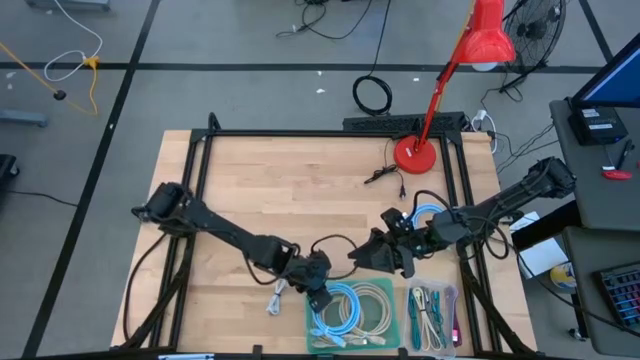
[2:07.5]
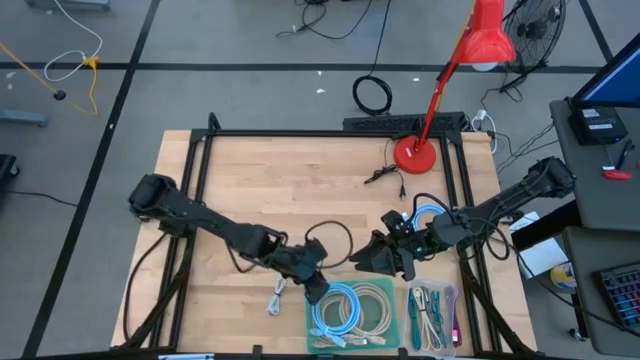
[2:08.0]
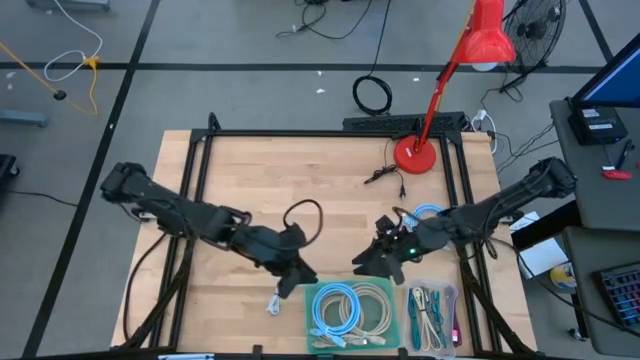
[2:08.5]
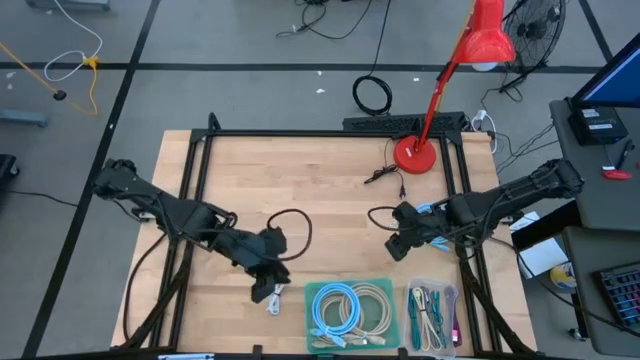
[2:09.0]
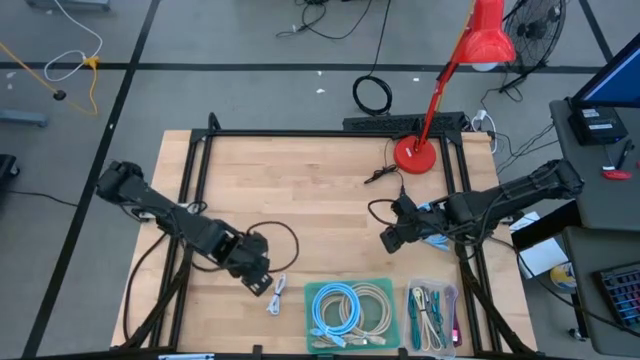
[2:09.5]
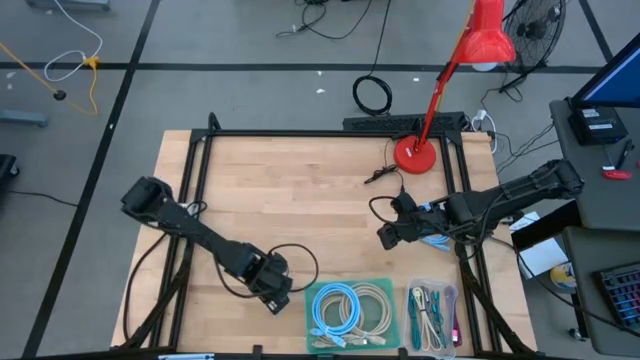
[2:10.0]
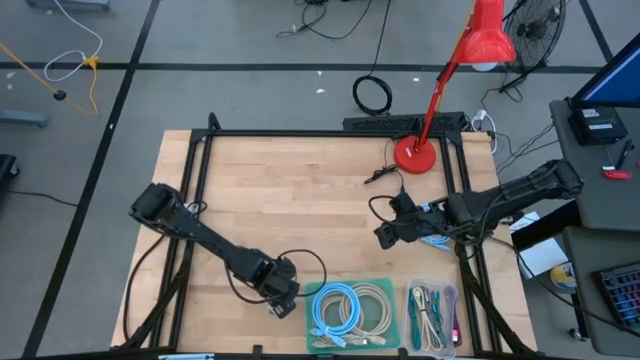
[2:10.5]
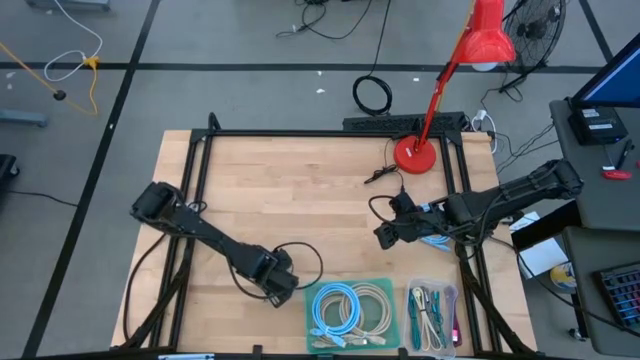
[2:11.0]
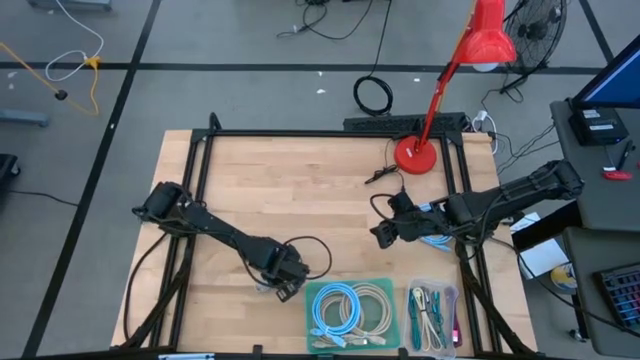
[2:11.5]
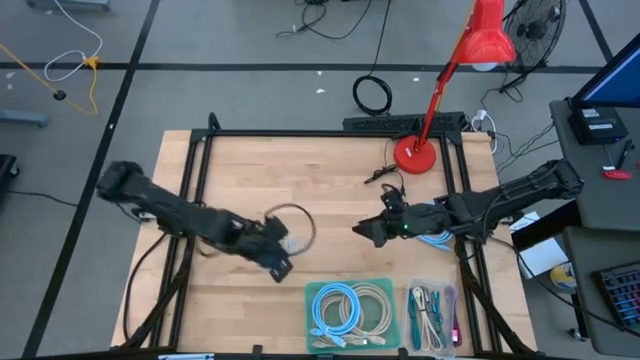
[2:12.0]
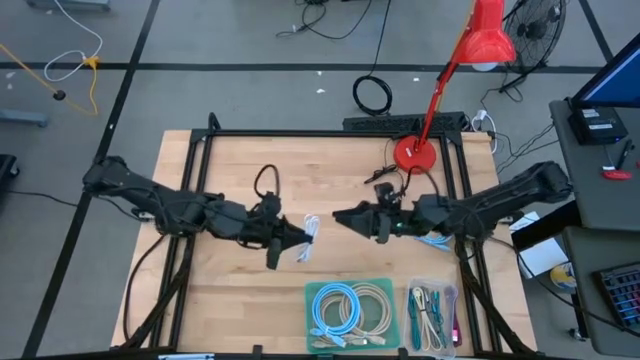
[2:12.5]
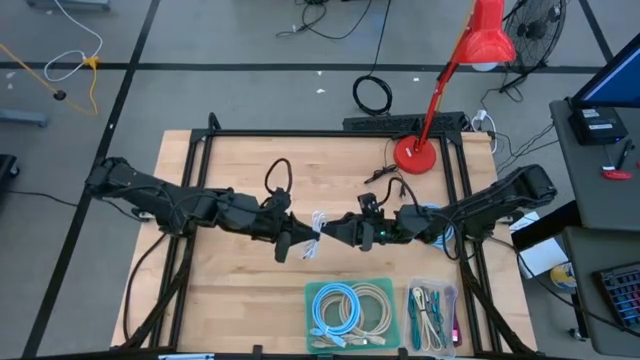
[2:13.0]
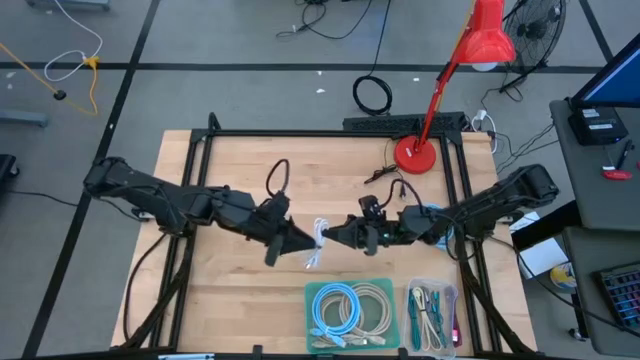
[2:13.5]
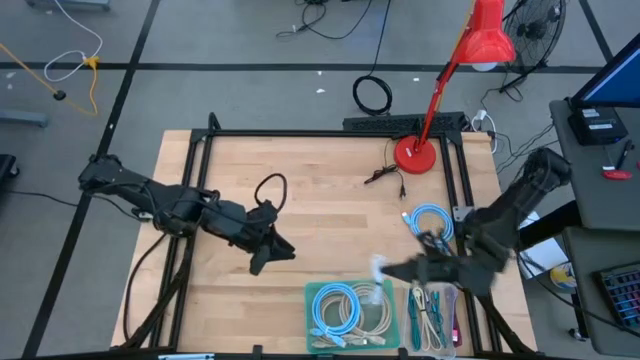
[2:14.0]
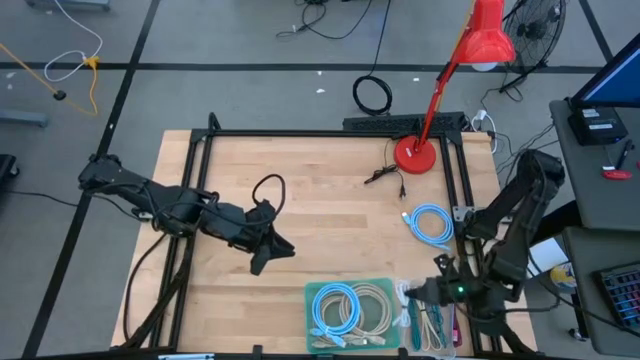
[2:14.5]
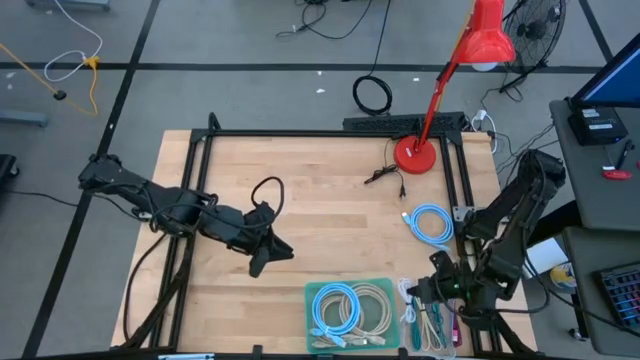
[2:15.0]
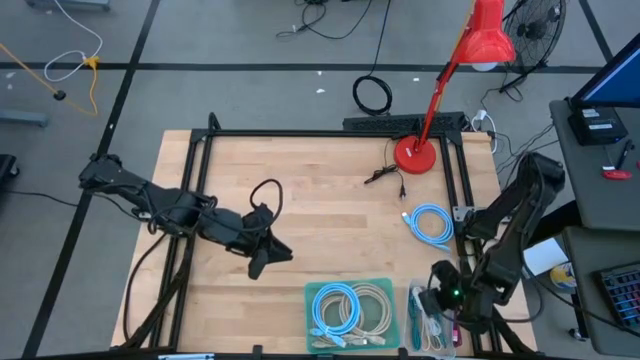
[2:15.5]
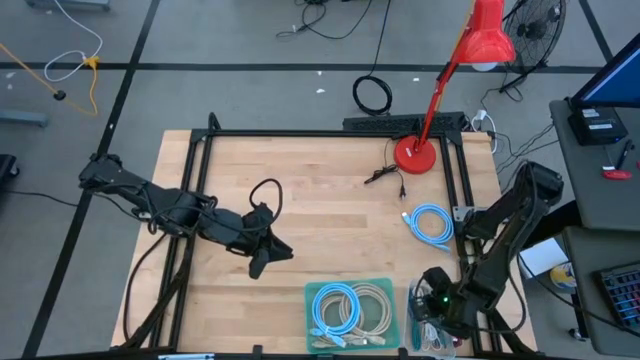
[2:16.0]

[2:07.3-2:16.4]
Task: Pick & Place USB Port
Put the white charger cable into the white transparent bin

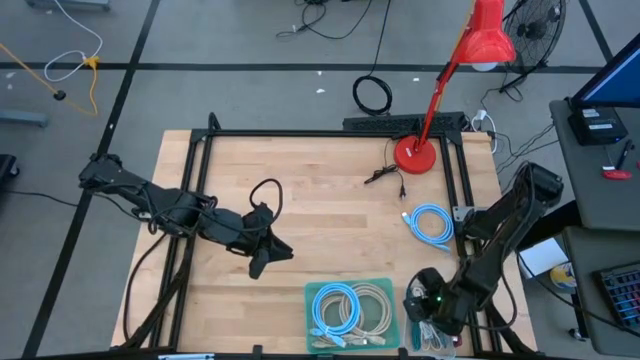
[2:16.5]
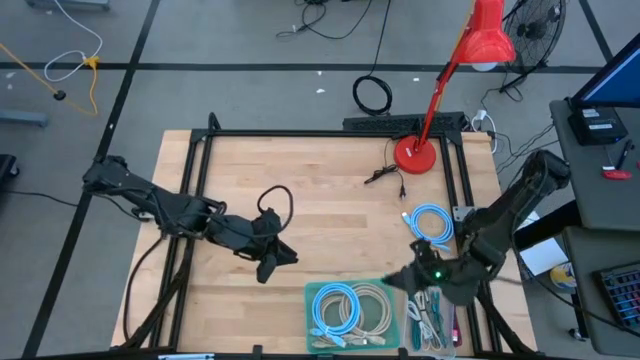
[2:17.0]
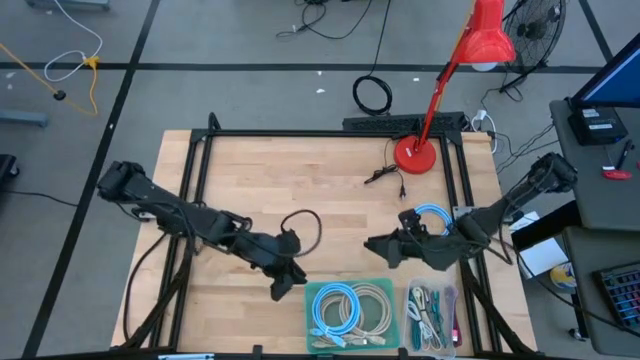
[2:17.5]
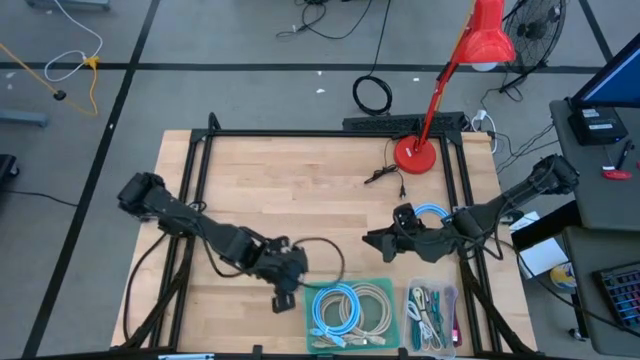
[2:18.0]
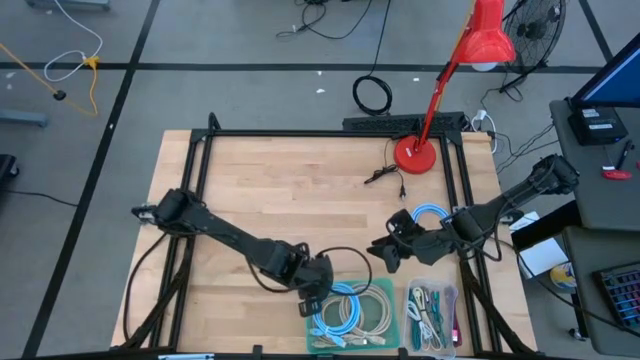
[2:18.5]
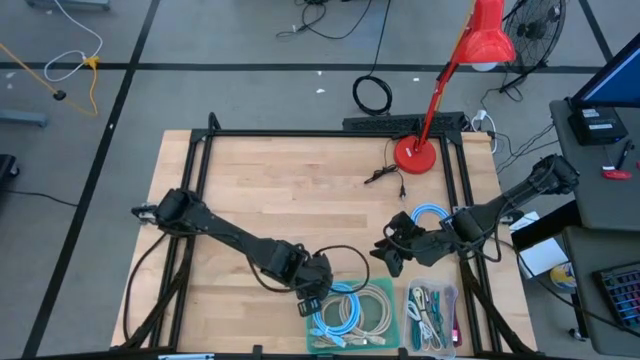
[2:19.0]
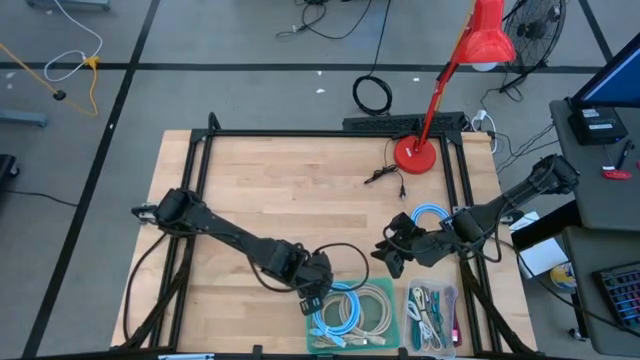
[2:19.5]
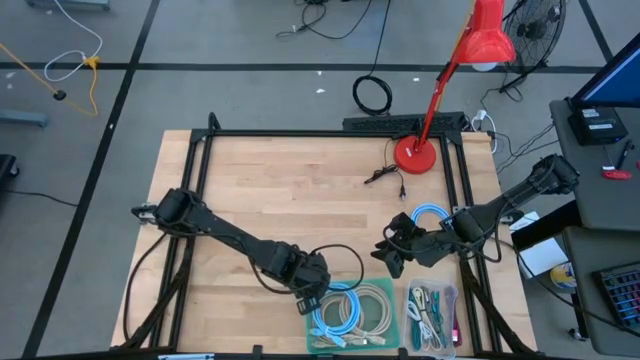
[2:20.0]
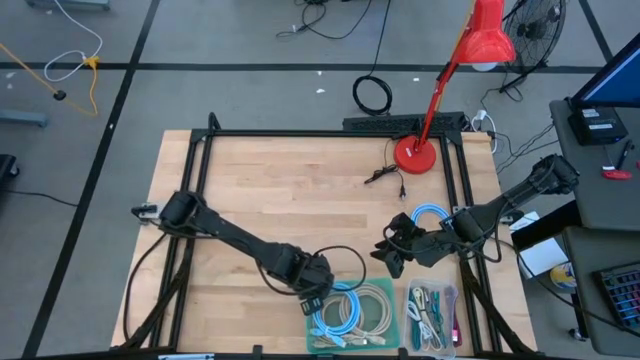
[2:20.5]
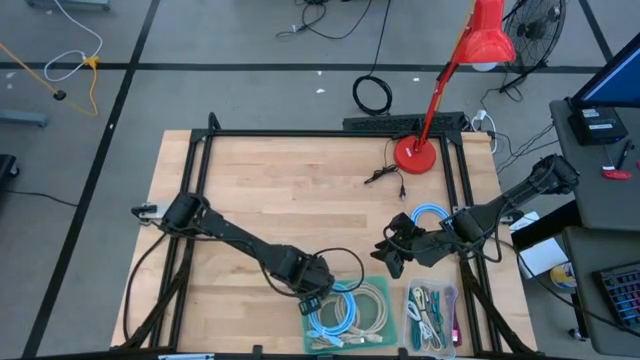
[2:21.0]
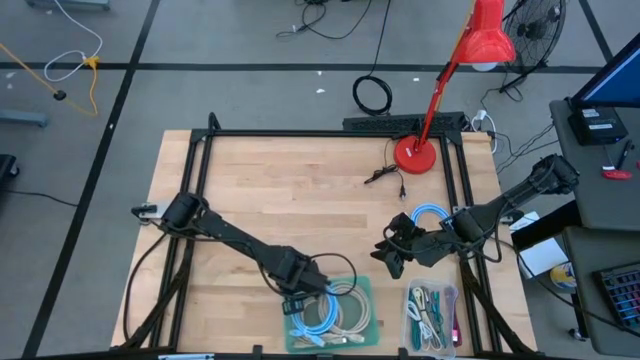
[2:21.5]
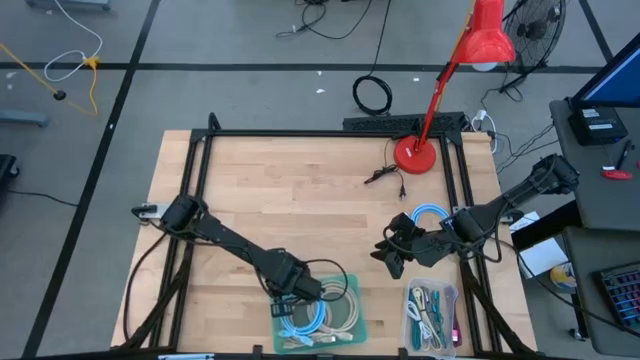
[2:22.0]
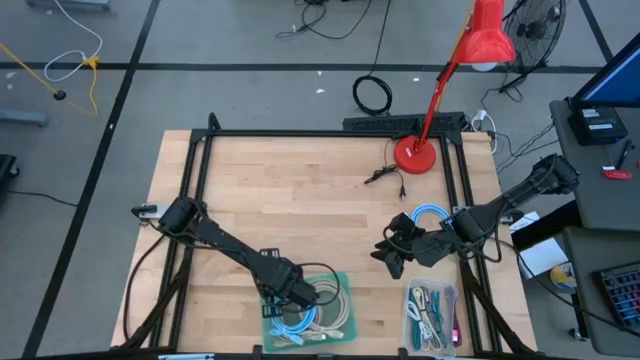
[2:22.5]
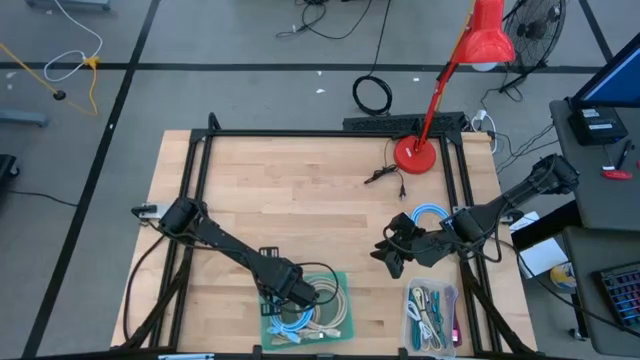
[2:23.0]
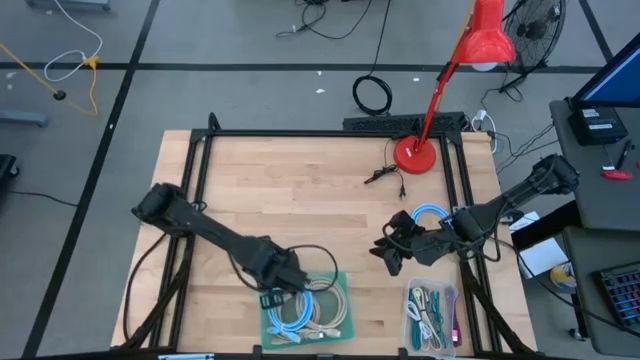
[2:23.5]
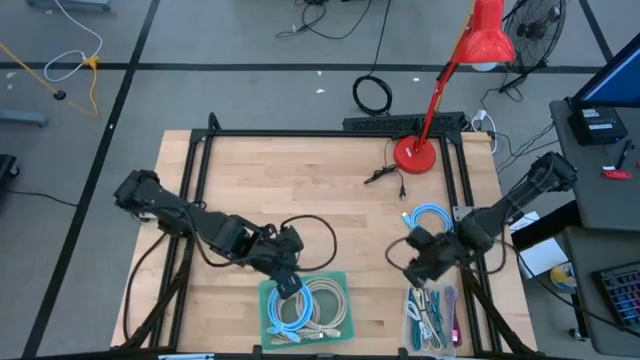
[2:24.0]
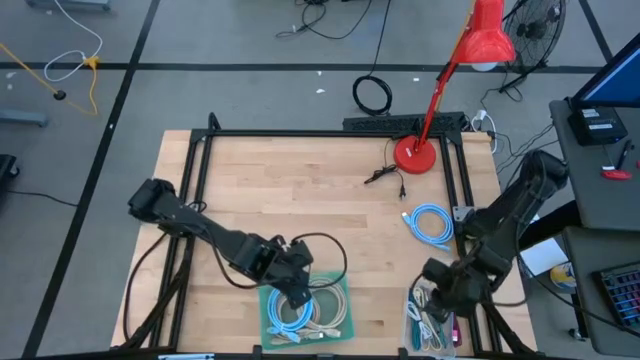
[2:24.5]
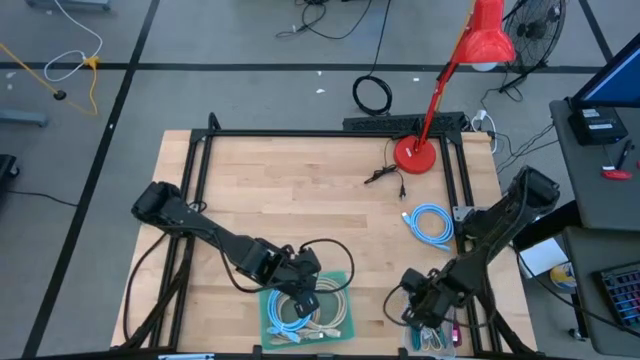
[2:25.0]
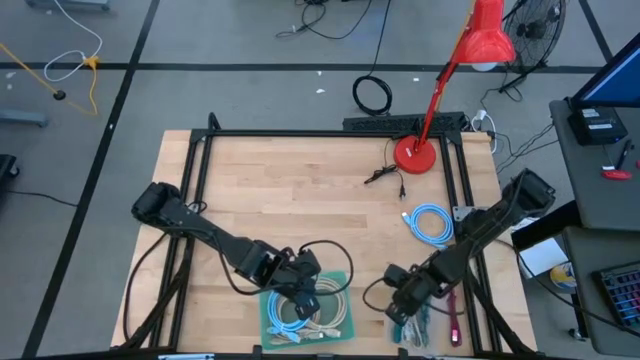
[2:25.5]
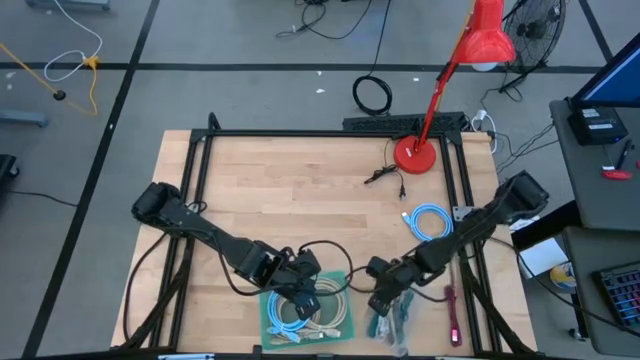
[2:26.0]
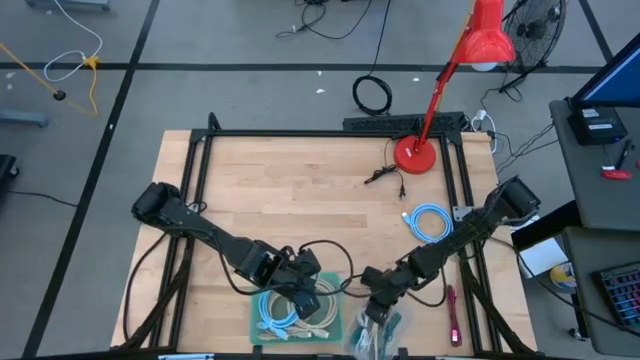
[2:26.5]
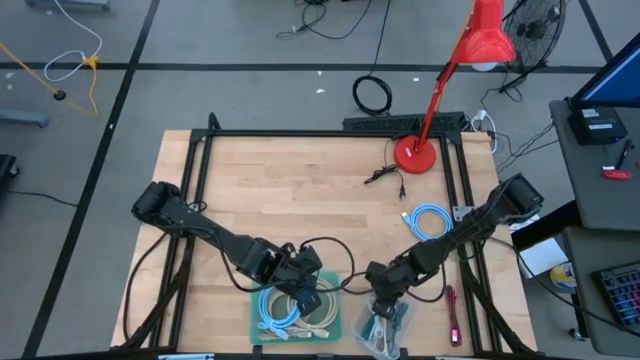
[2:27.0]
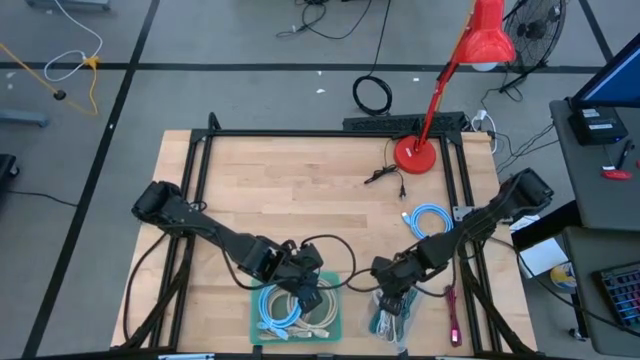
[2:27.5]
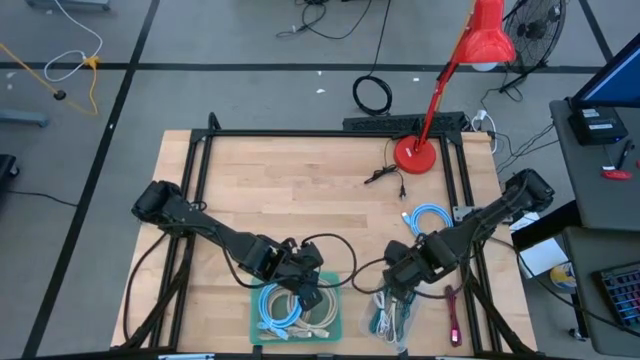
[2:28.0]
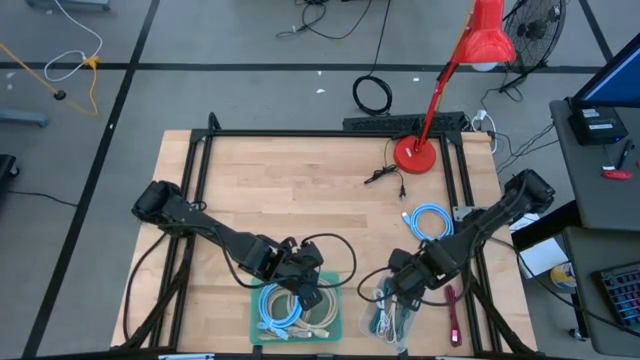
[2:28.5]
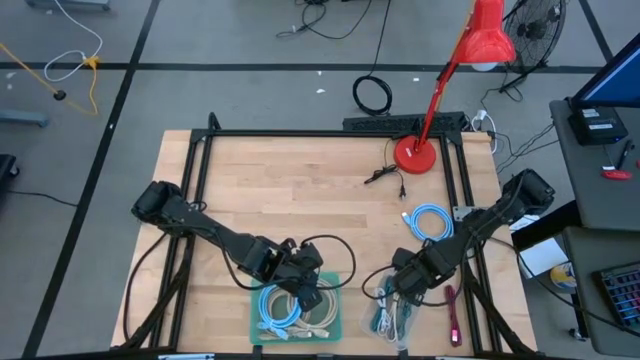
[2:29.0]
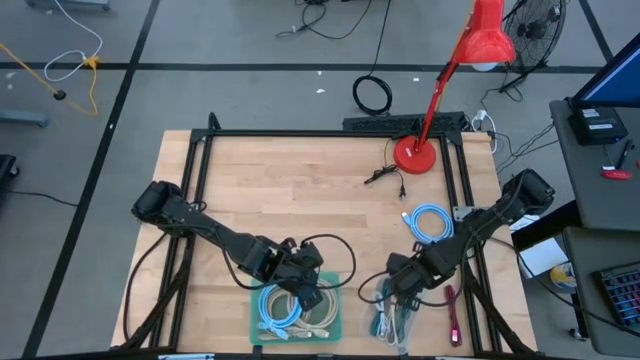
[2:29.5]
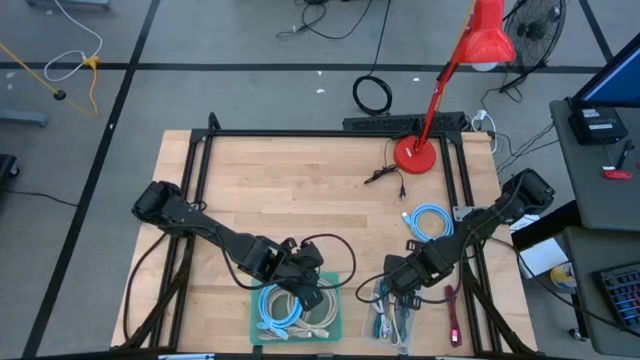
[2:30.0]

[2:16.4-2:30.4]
Adjust the bins
